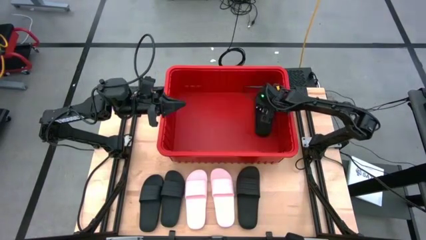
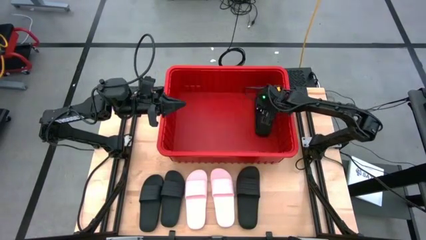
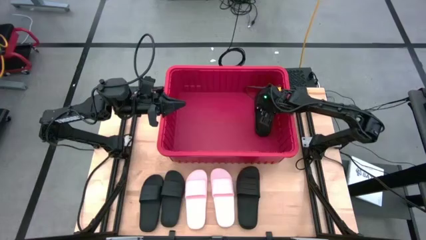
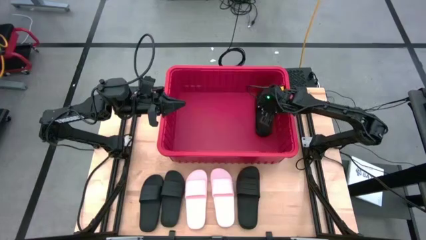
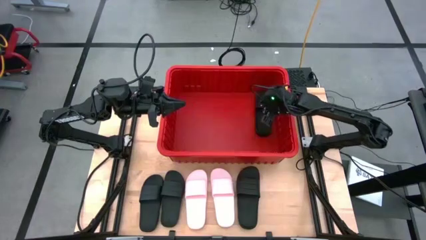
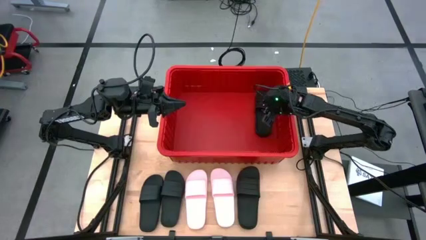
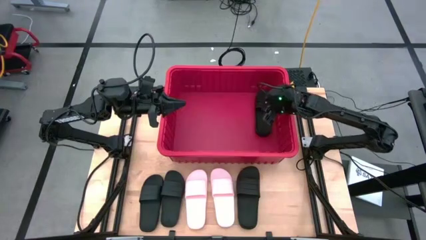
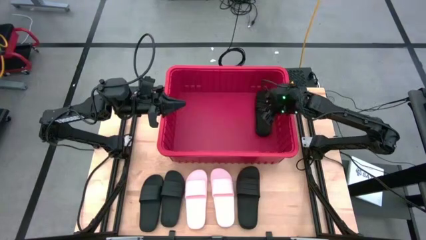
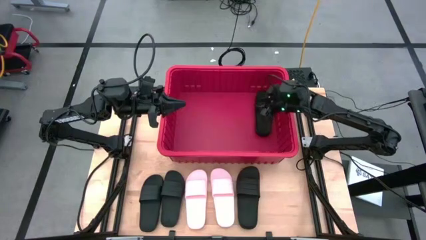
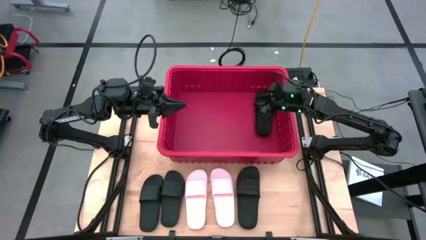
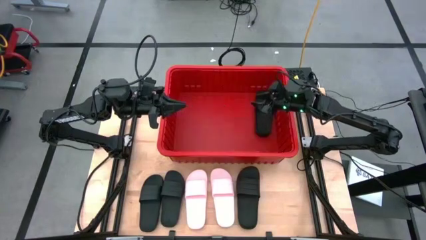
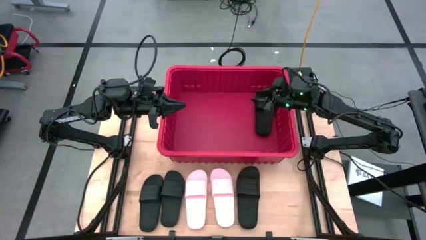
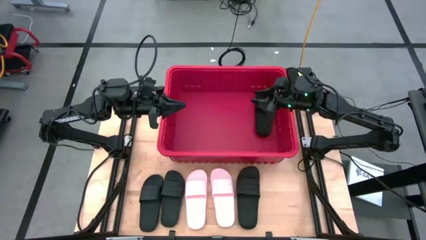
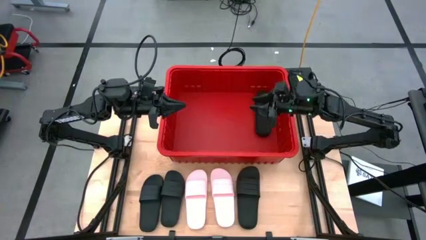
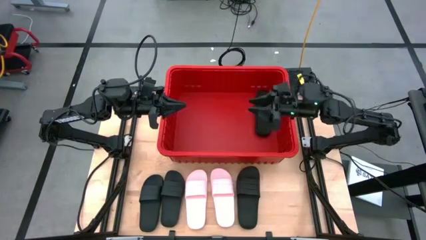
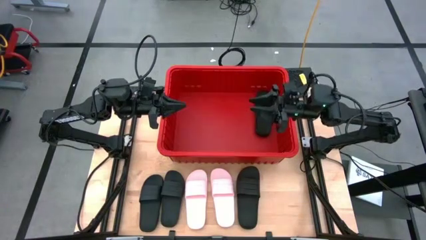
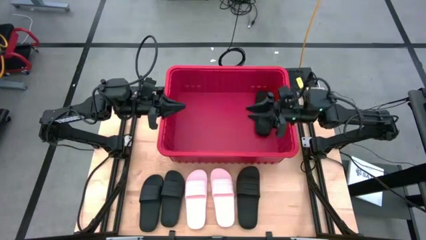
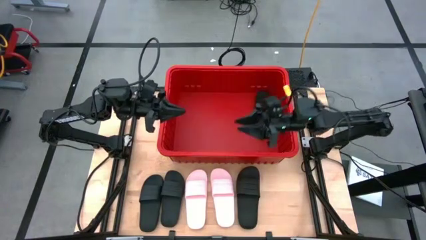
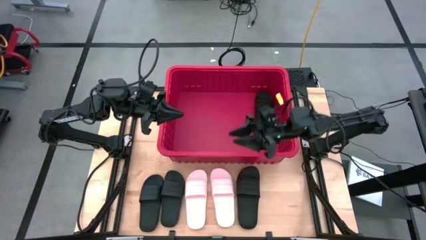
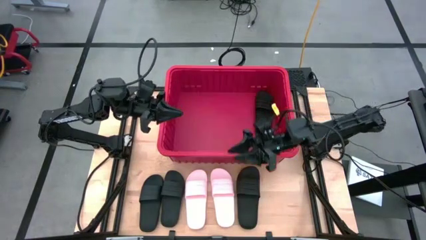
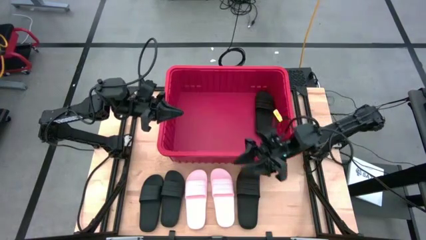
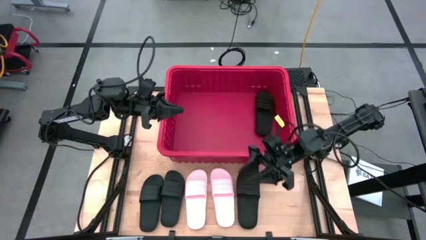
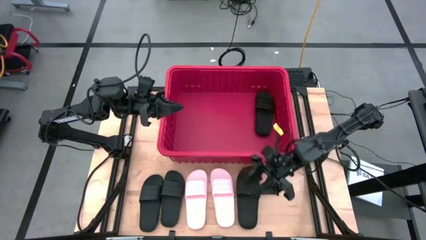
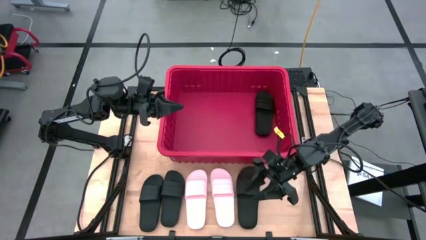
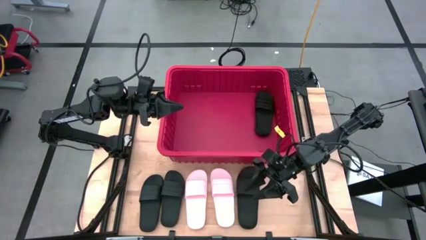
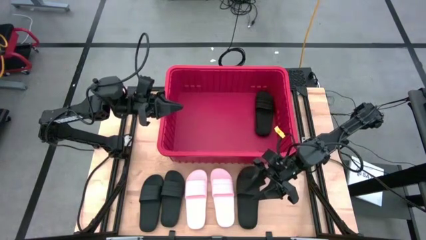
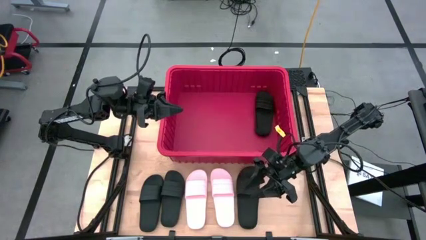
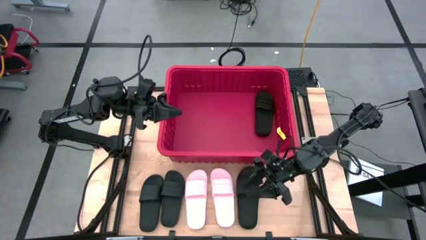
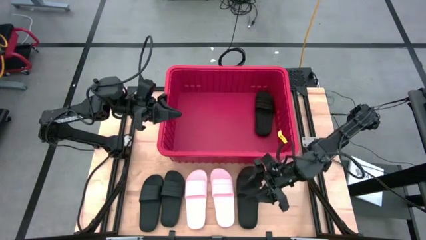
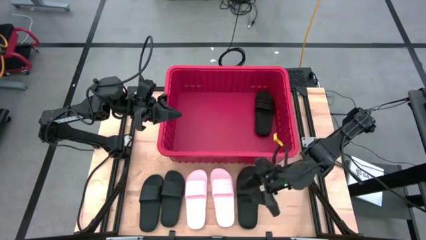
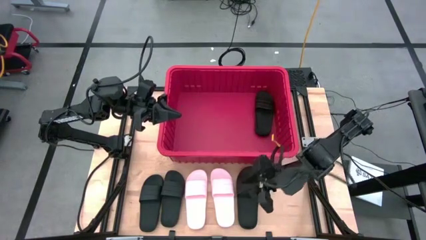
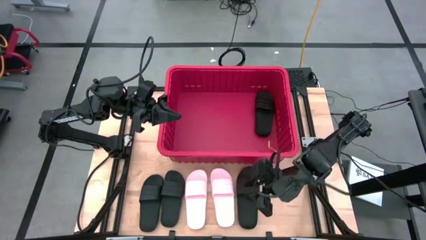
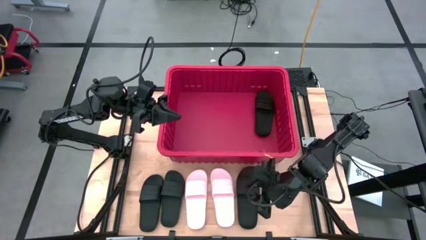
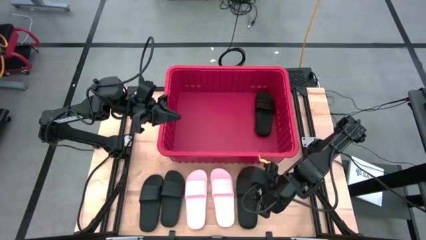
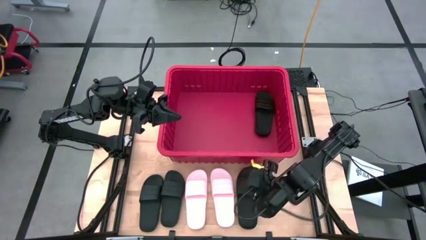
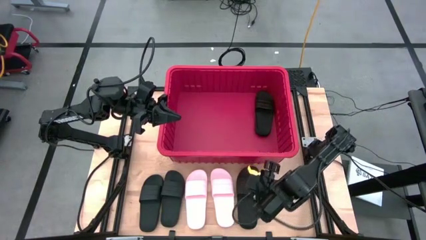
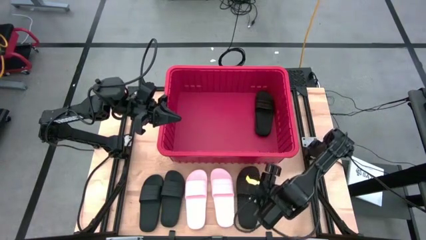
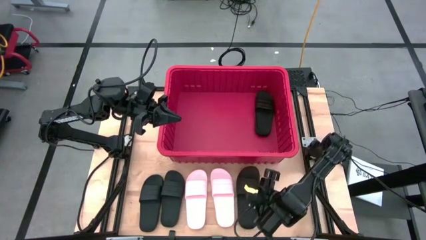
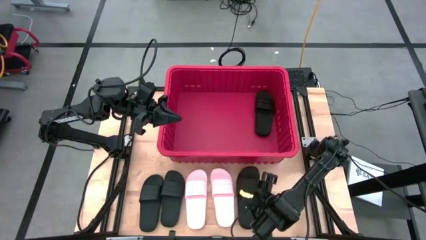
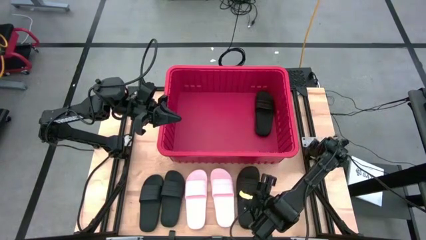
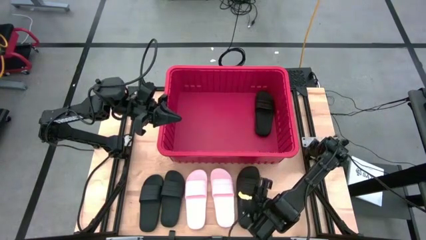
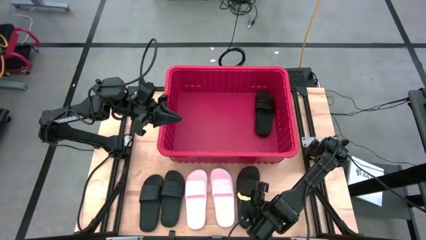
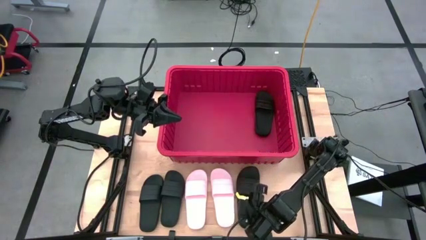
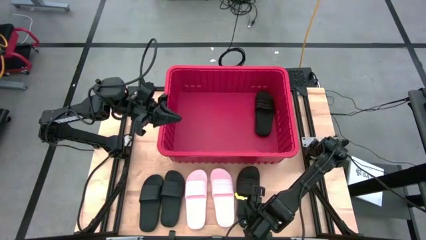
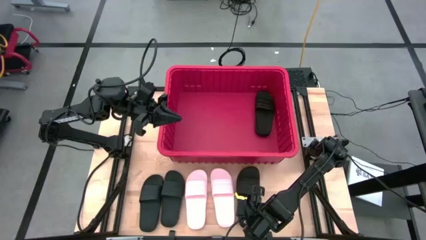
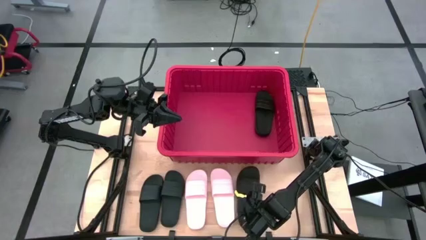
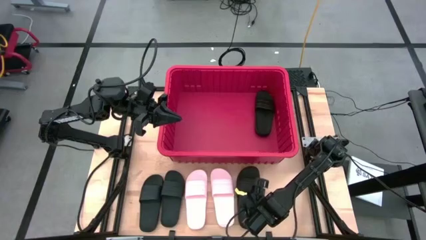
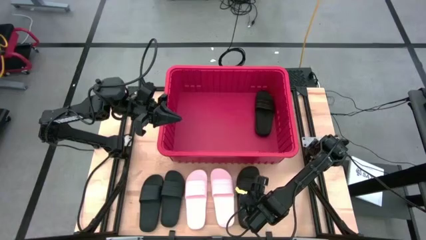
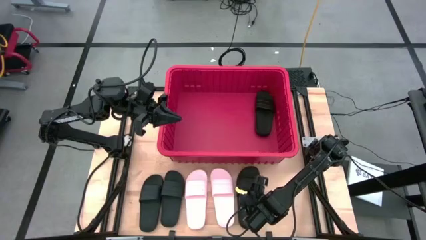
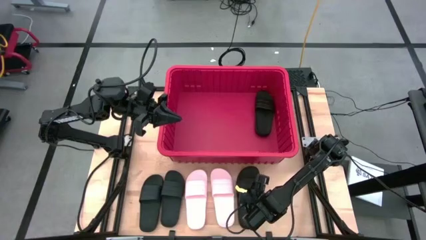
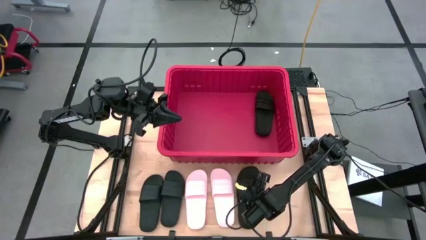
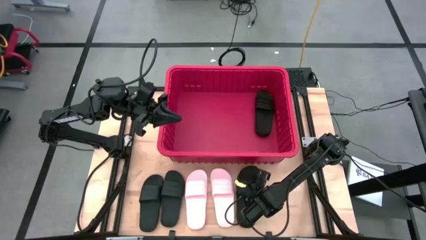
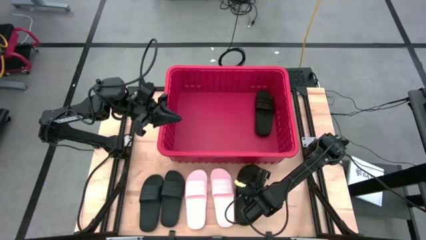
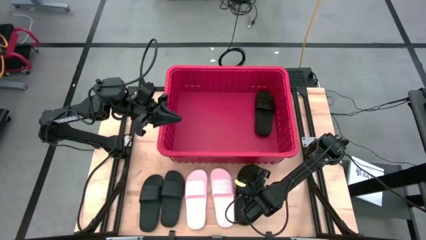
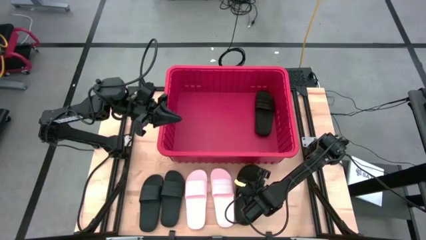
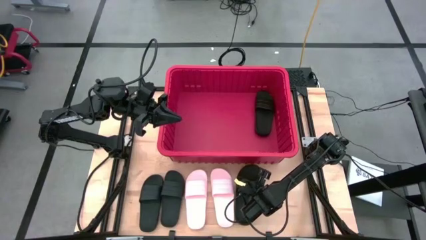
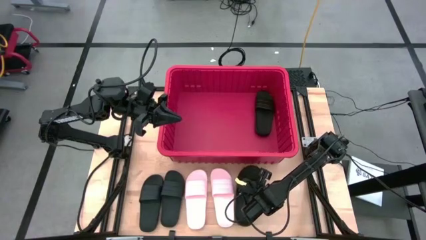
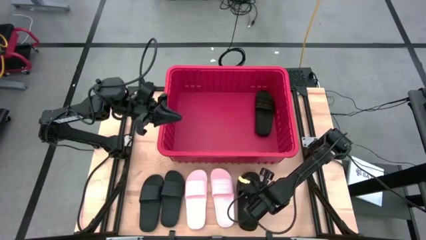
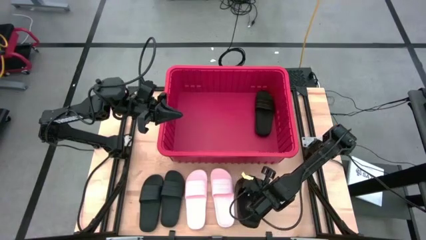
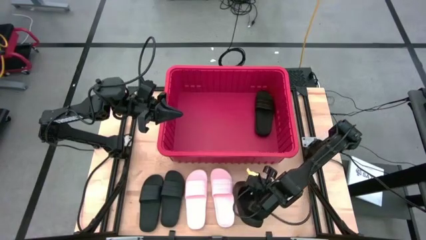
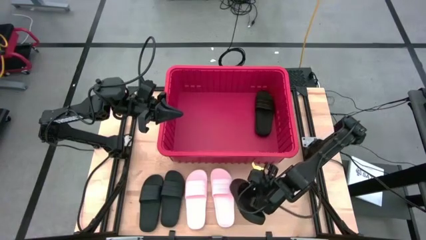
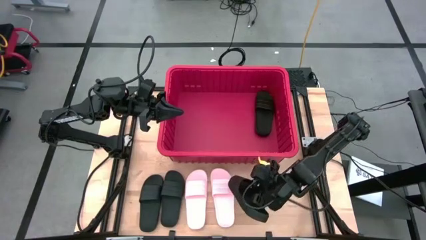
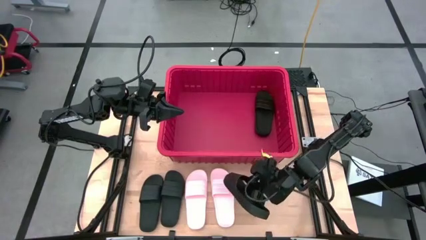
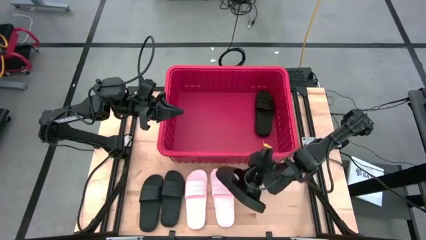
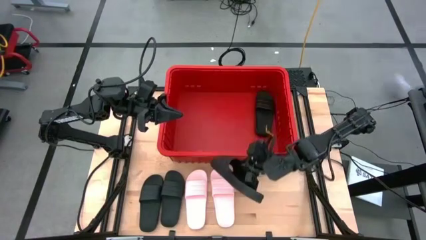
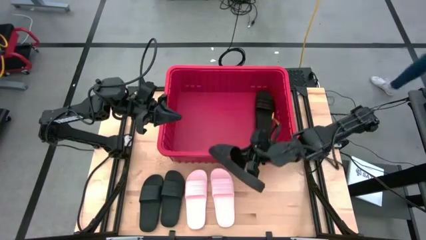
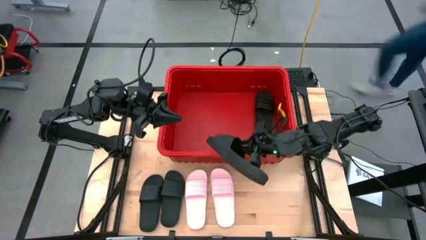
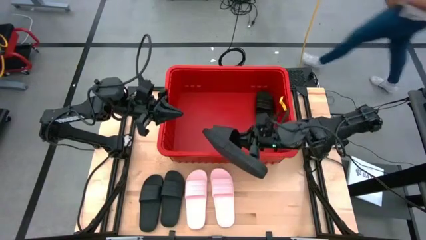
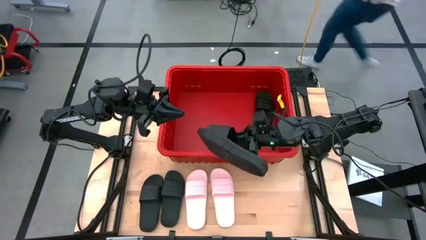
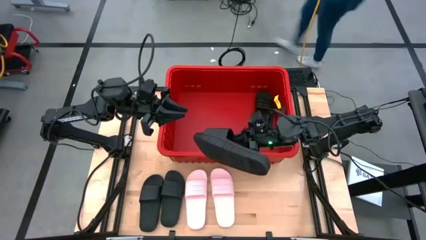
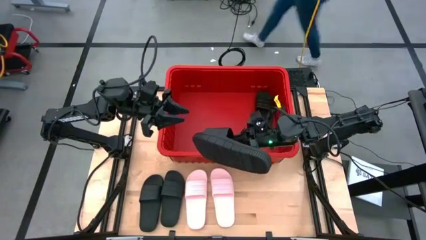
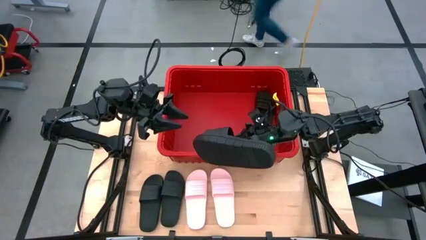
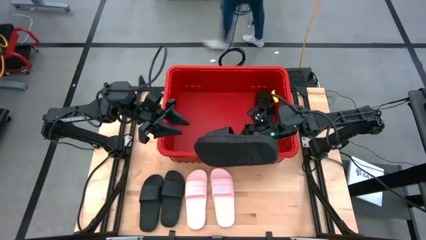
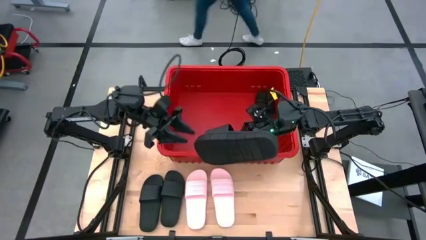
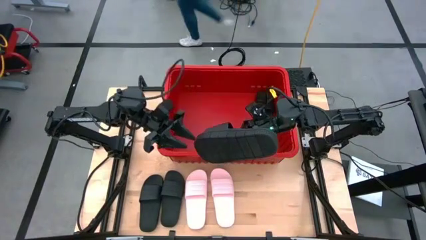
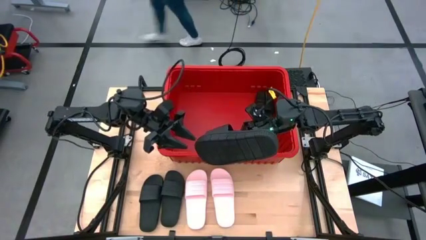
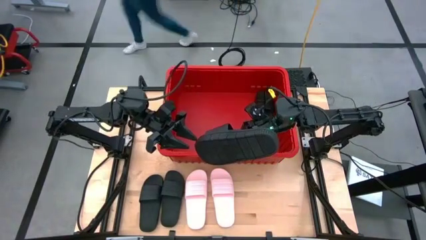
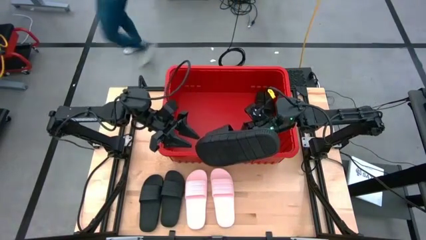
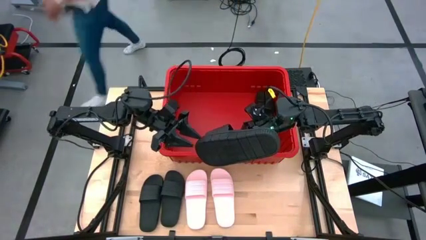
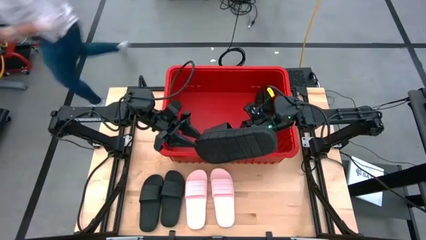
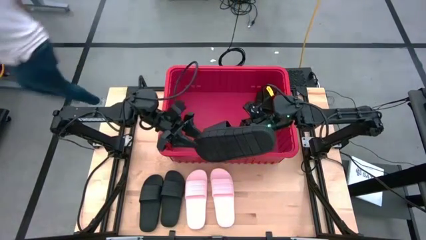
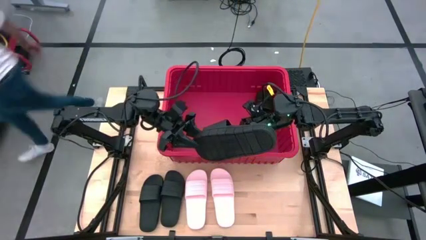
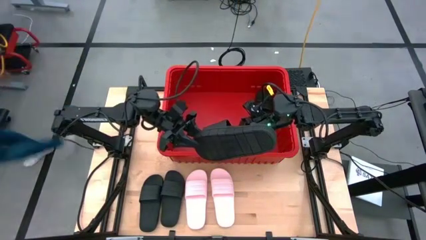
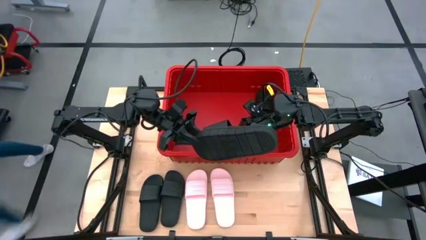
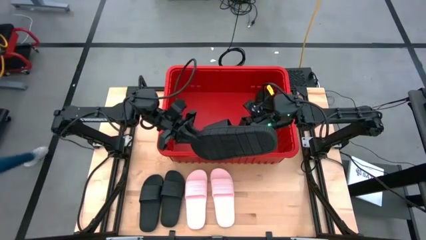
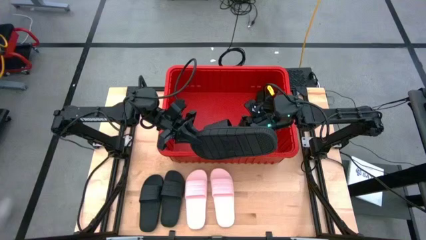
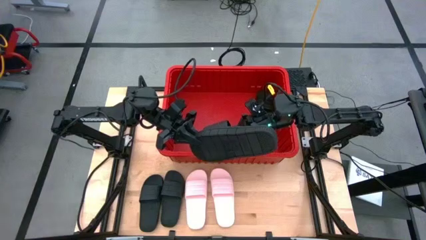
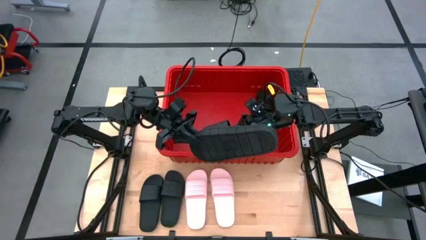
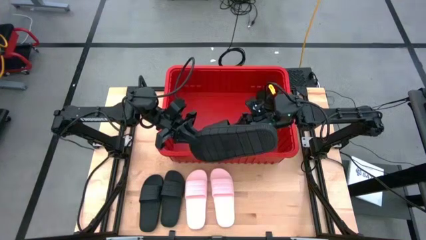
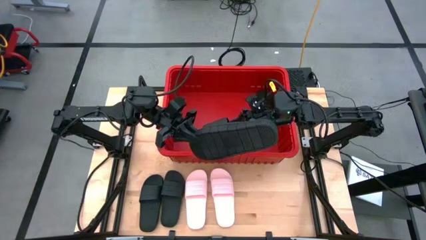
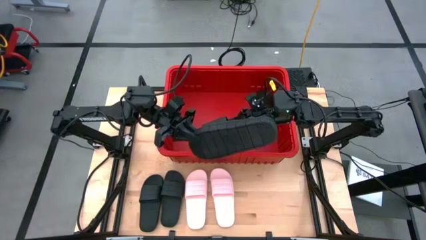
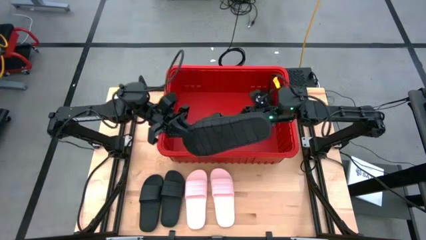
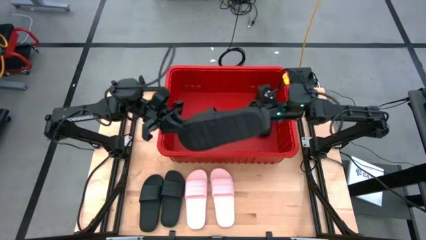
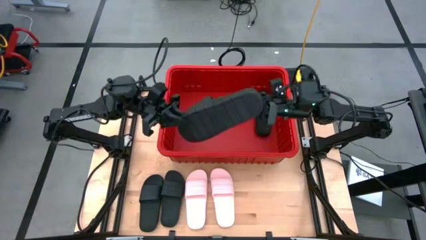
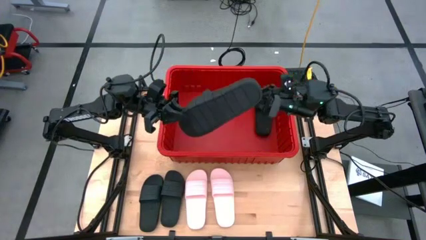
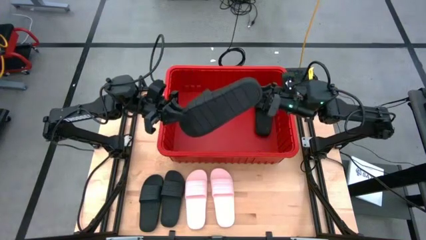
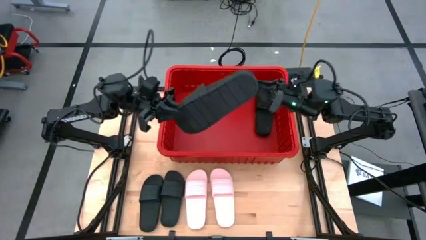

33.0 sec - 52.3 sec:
Task: Pick and place slides into bin
Put the black slide into the red organizer bin
